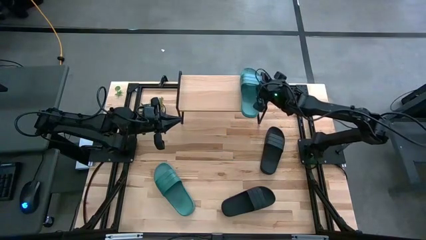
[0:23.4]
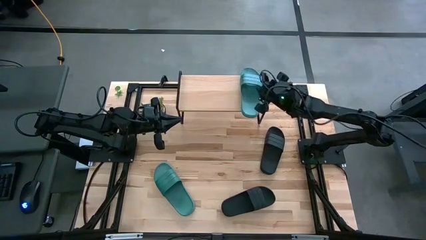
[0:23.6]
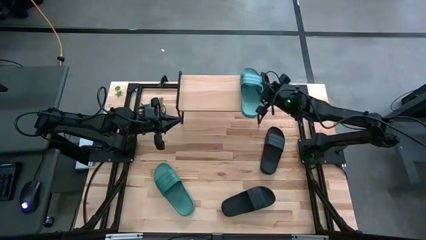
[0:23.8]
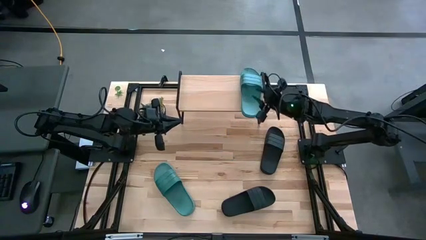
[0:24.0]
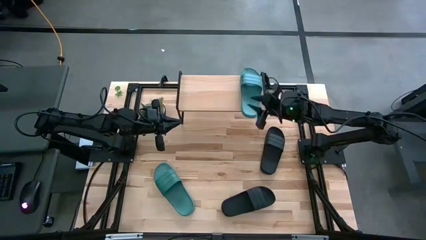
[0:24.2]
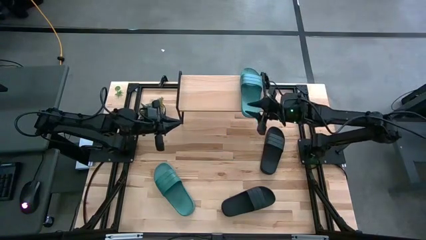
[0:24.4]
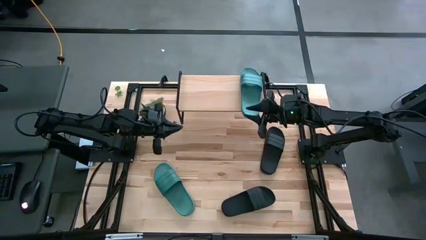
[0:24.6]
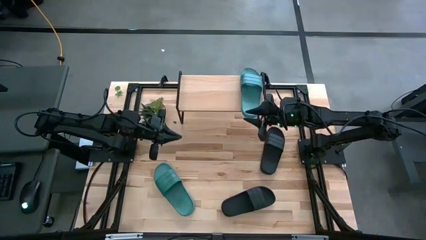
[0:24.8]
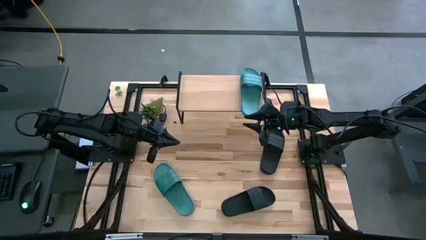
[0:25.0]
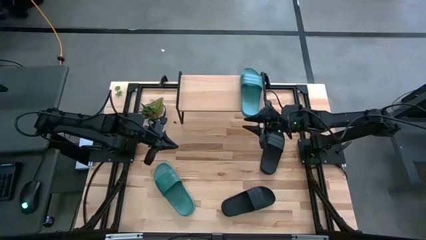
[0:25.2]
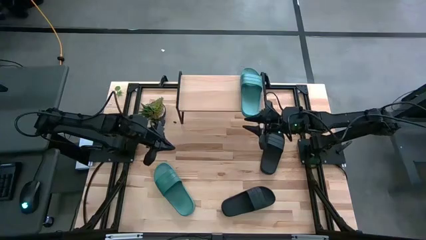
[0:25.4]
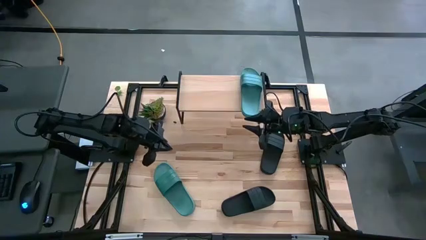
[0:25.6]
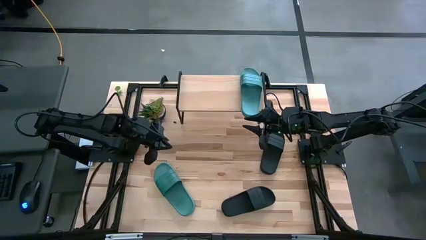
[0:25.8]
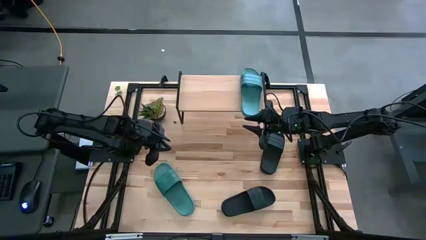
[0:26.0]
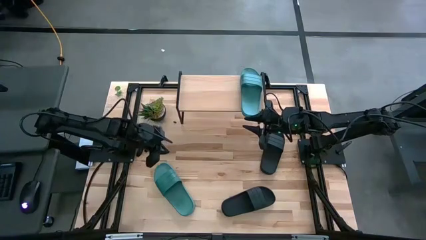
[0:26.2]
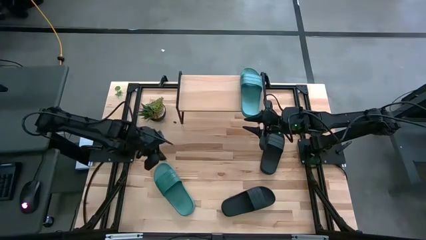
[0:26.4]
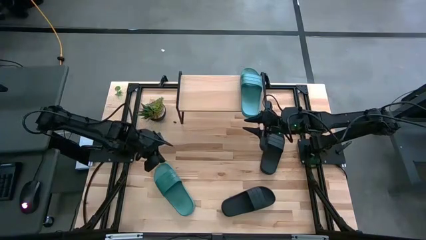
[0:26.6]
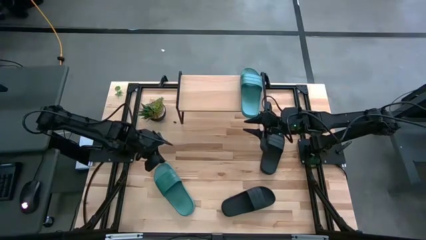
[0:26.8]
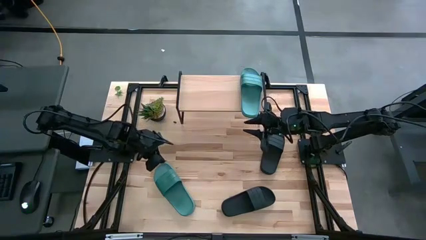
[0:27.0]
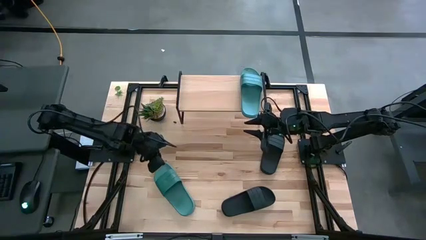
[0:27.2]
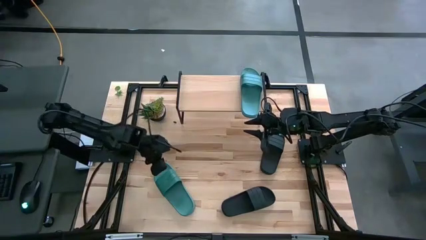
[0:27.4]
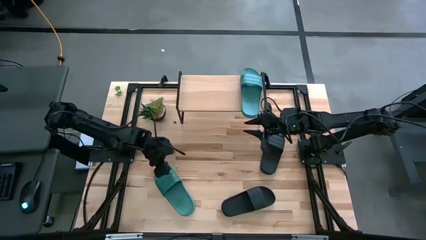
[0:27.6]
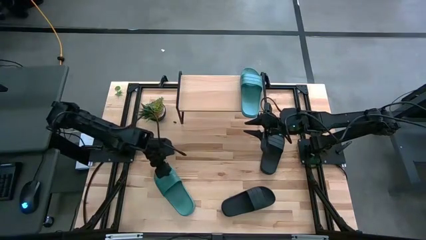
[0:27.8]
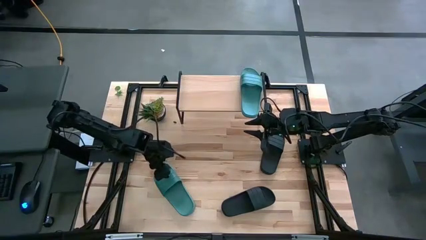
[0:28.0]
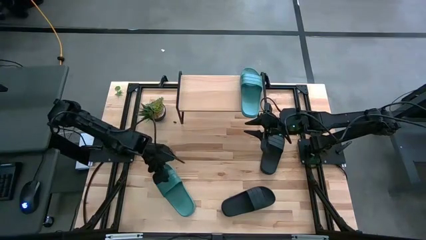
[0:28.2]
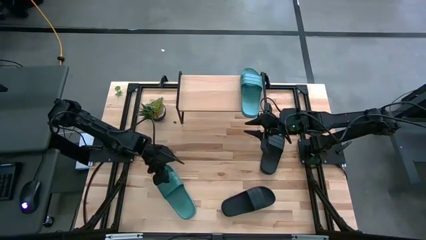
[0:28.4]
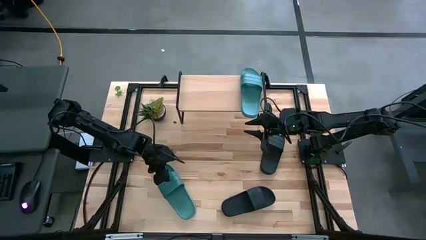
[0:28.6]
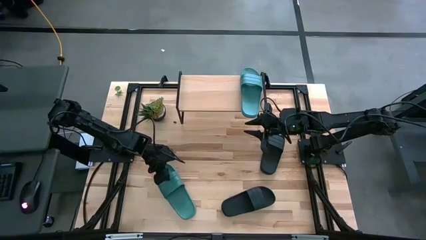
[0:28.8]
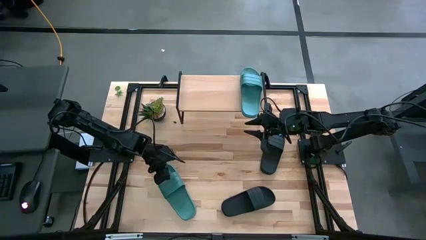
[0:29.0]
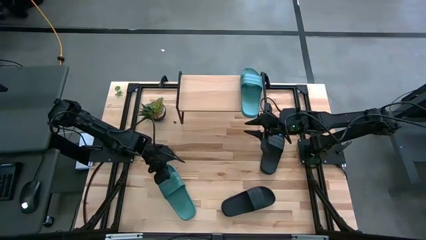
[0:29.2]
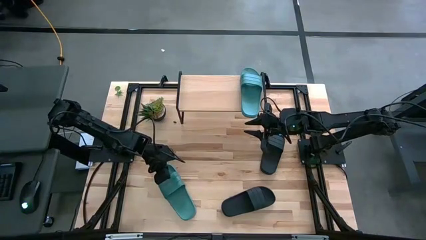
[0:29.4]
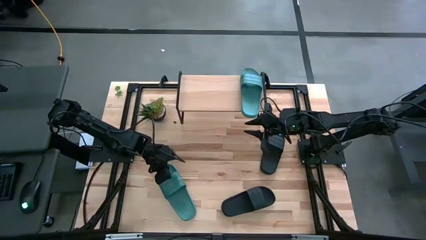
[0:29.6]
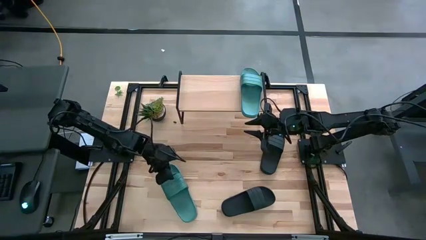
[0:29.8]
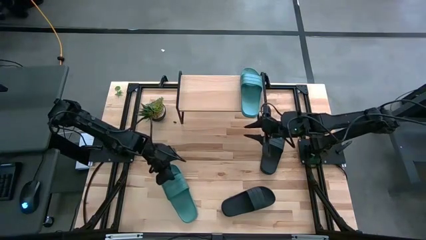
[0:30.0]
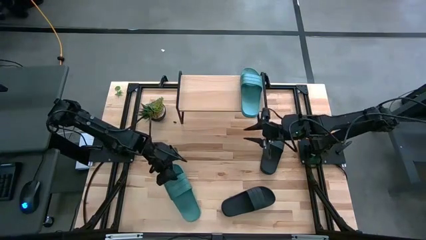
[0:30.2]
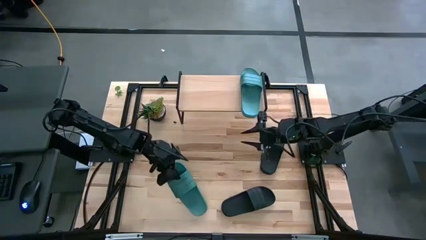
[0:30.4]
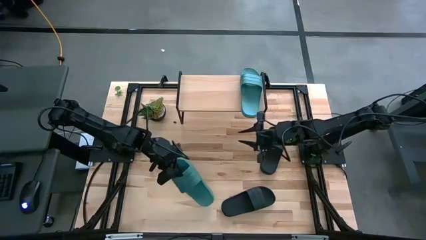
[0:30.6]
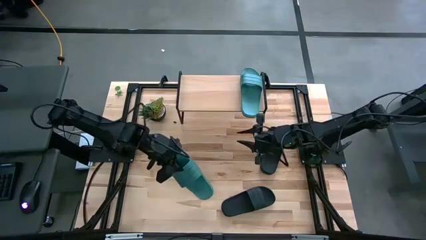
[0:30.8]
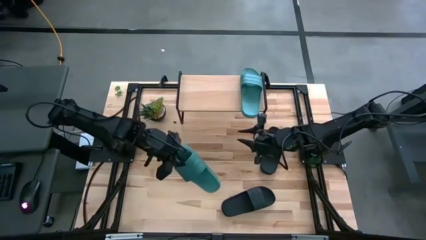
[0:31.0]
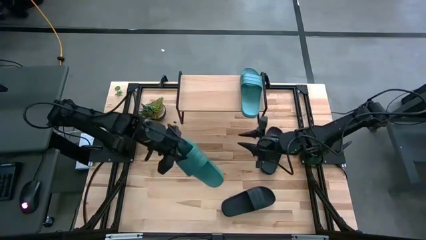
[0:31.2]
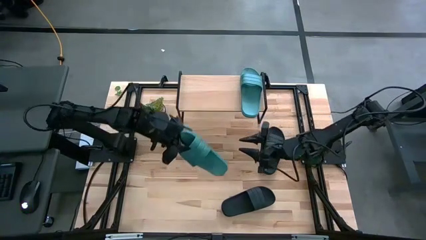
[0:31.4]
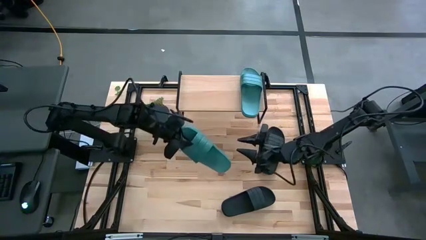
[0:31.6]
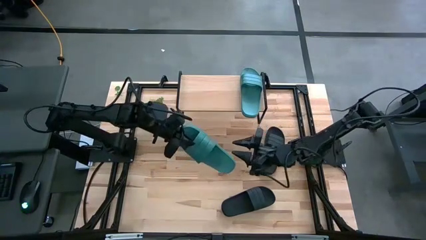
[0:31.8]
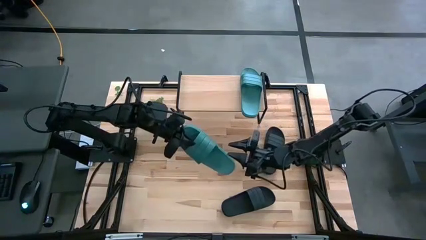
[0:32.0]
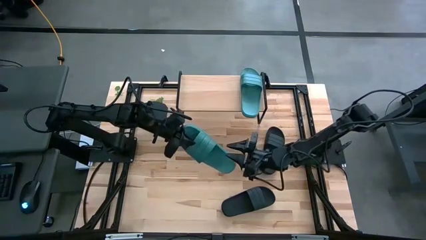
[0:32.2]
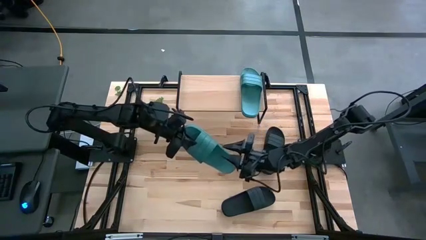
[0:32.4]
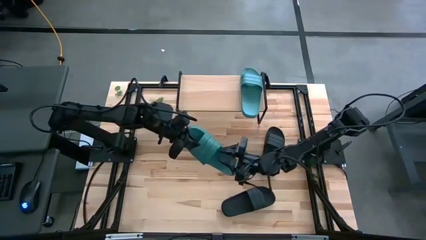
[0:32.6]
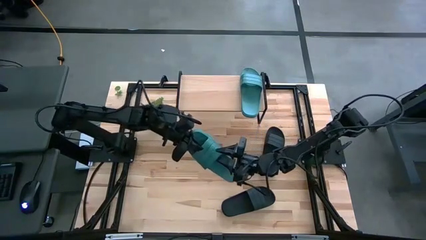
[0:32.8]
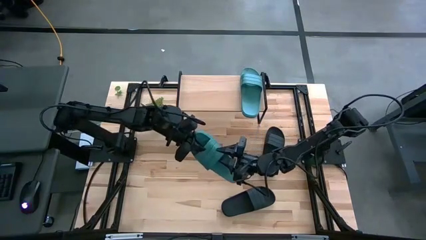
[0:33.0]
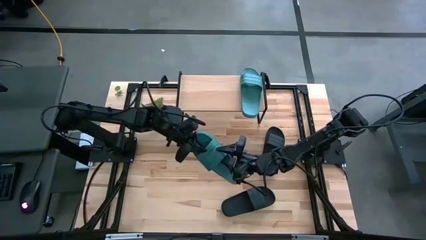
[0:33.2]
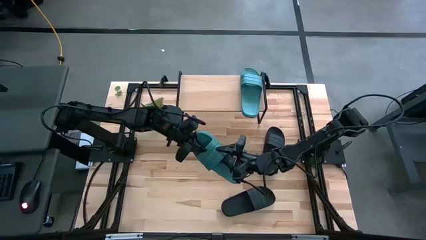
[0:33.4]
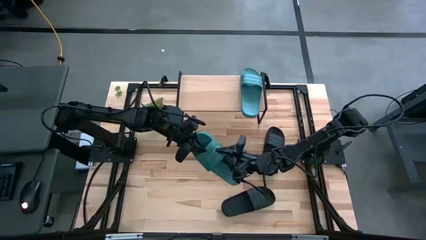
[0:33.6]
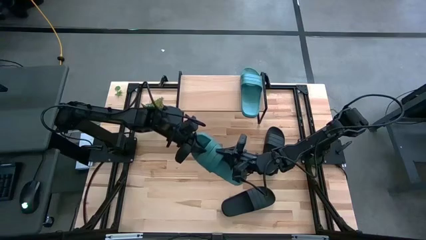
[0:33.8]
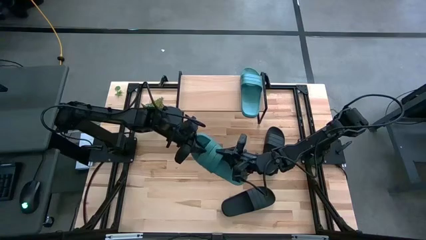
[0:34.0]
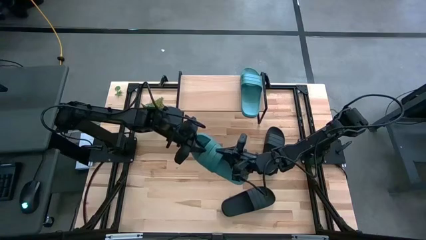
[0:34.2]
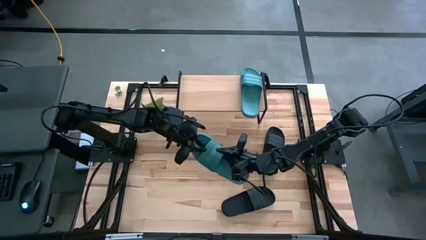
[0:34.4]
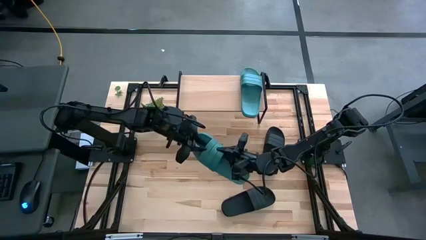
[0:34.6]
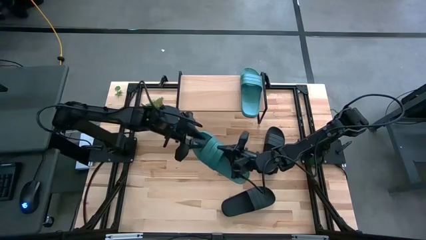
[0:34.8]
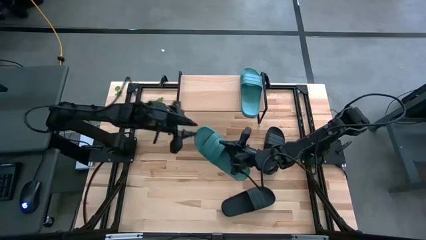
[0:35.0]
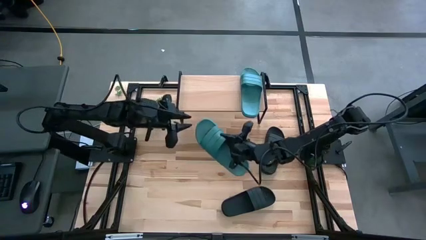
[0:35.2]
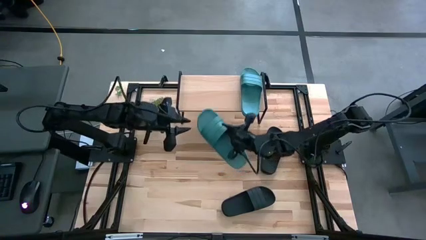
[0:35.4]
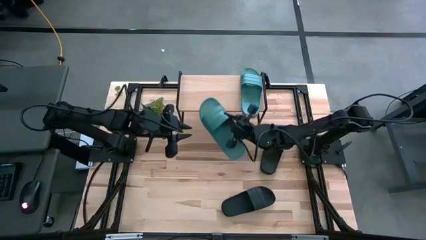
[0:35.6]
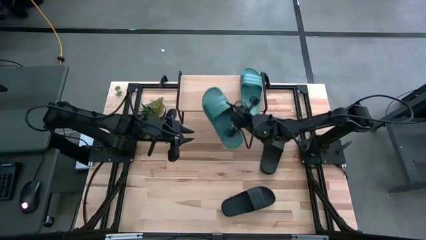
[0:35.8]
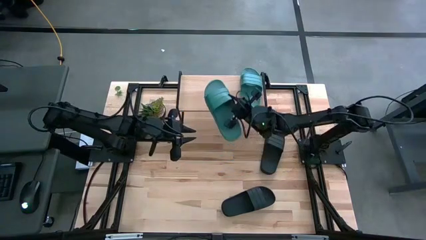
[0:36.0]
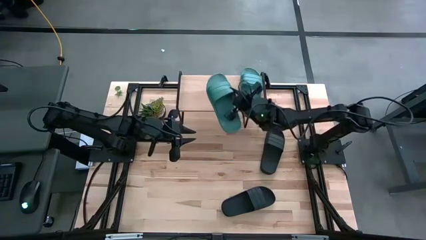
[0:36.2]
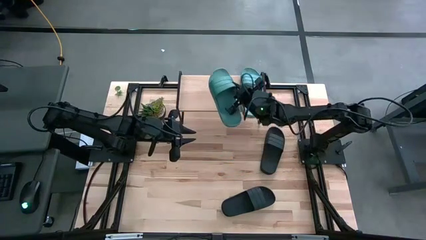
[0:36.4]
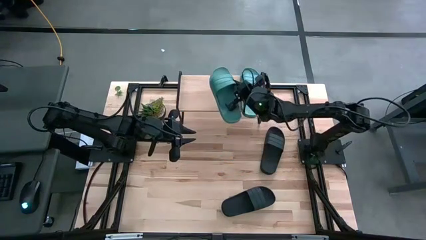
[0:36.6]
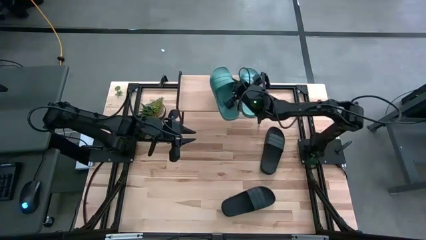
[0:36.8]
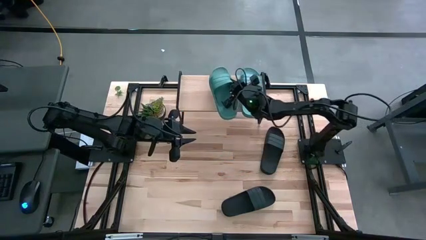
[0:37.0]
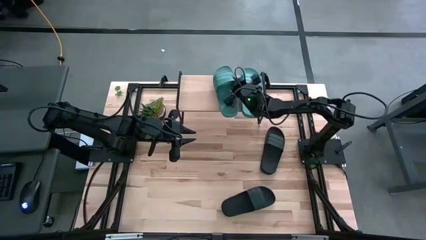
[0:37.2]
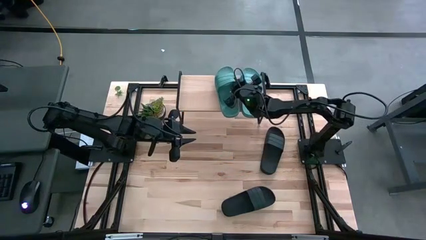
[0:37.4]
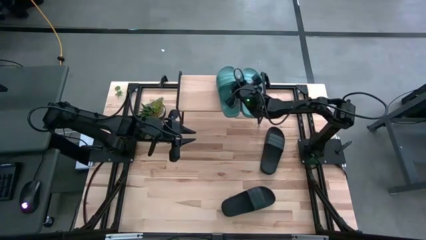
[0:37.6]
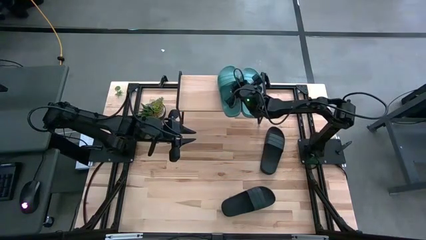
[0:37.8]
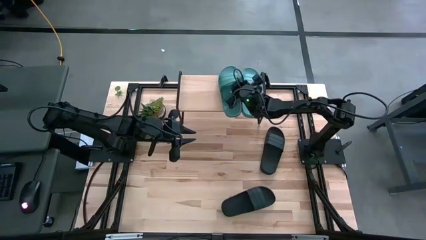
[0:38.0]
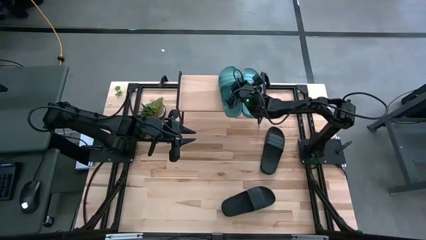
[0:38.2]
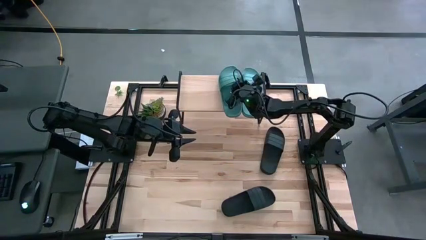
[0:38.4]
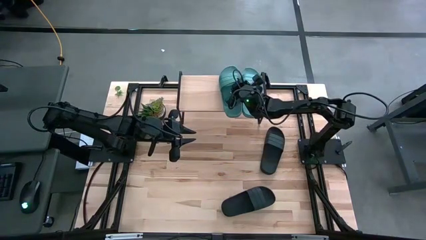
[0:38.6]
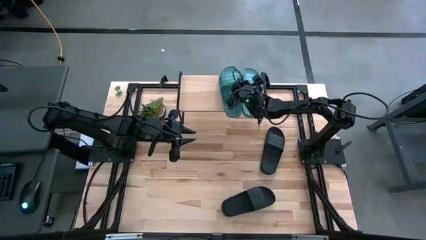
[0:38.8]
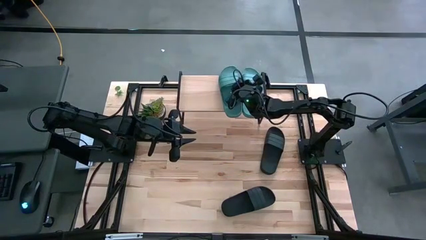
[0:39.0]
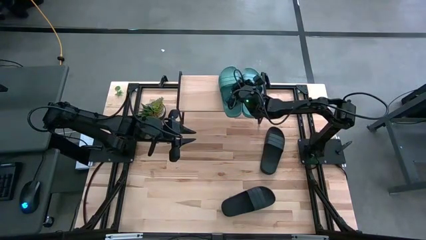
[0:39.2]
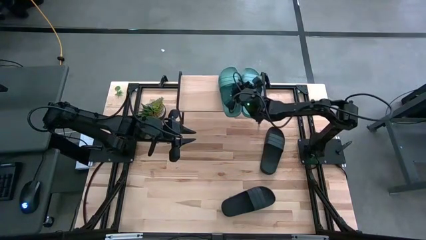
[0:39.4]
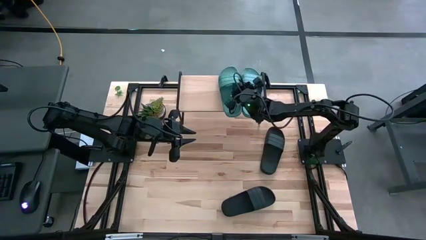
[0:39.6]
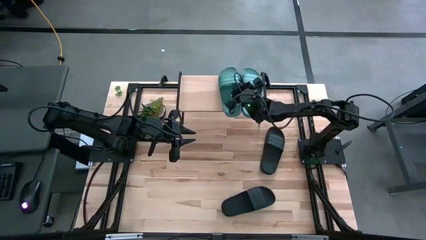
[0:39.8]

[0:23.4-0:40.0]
Task: Pick and place slides into the shelf
Put the green slide on the shelf
